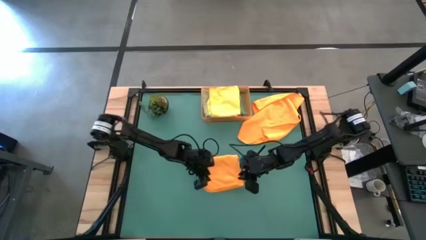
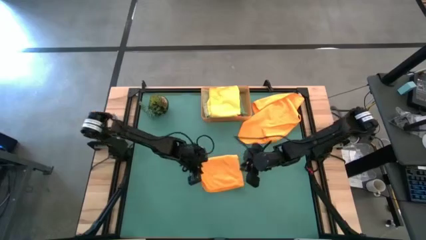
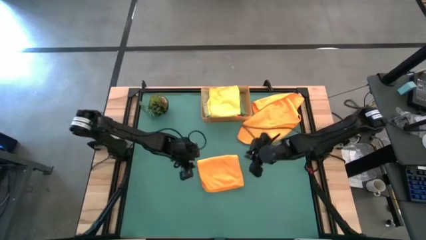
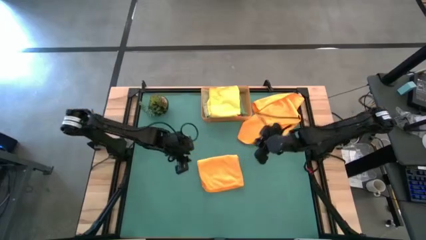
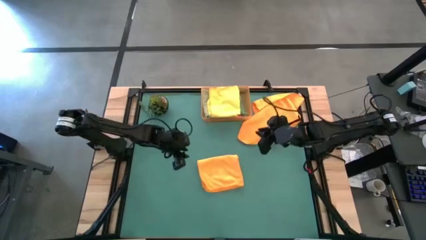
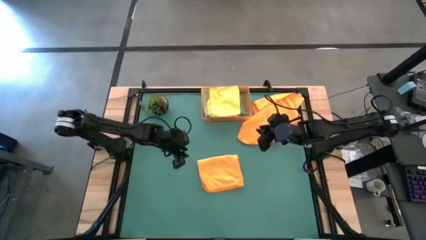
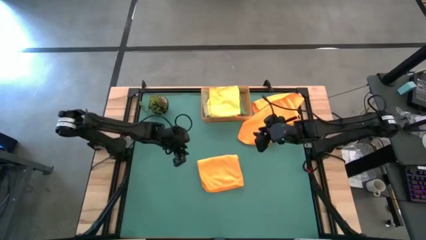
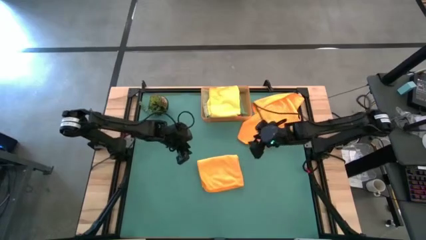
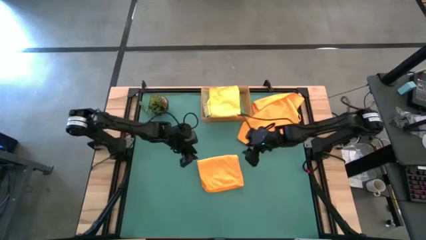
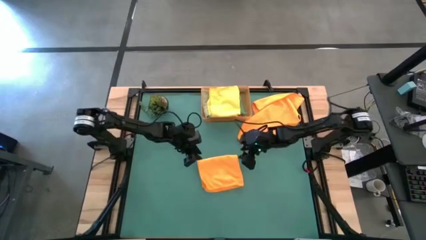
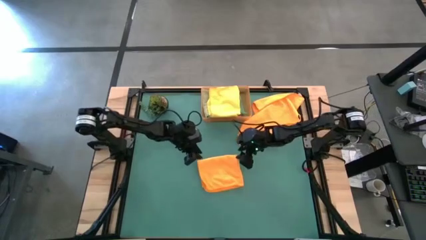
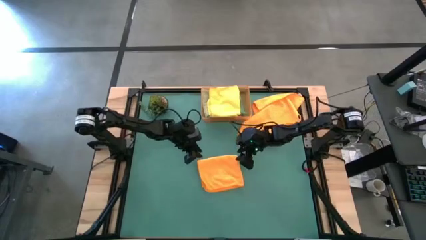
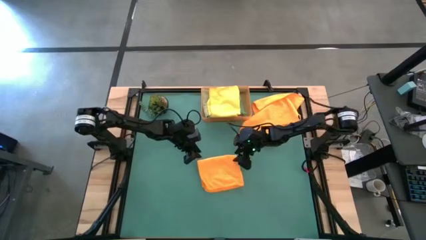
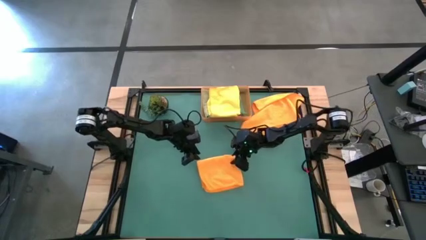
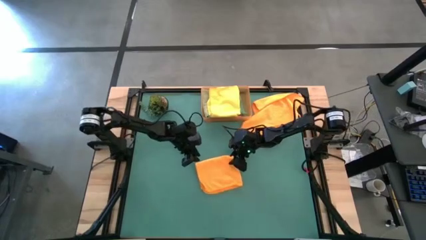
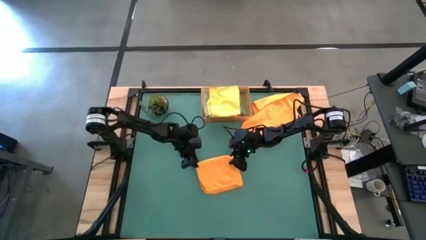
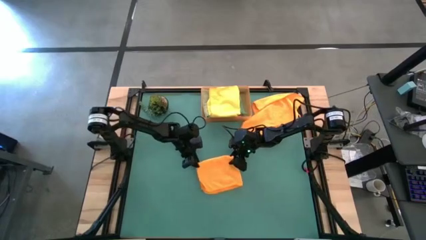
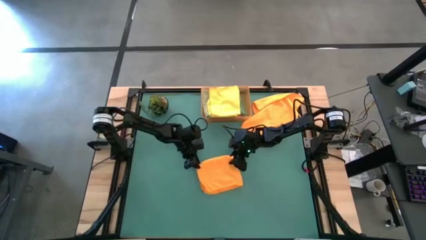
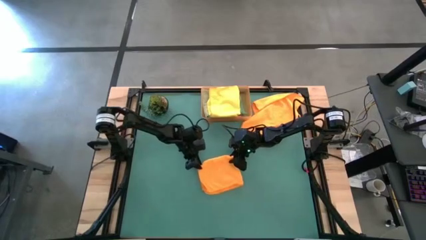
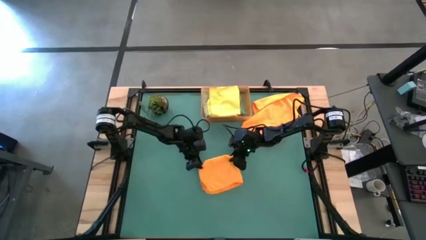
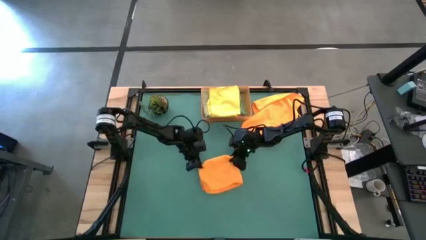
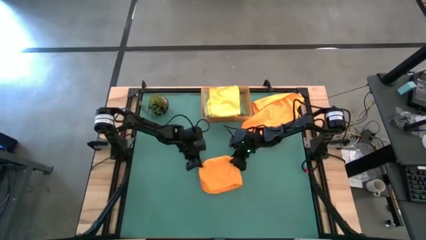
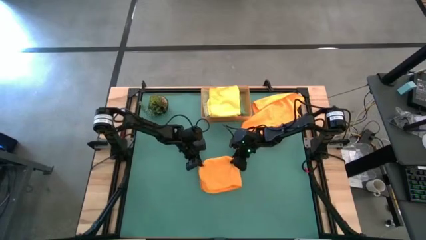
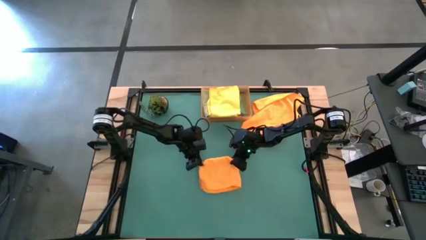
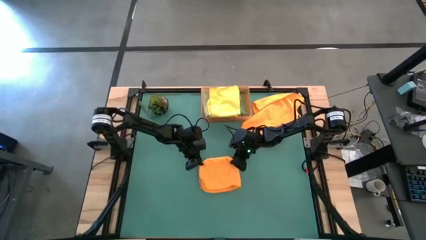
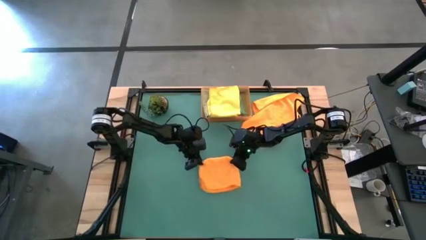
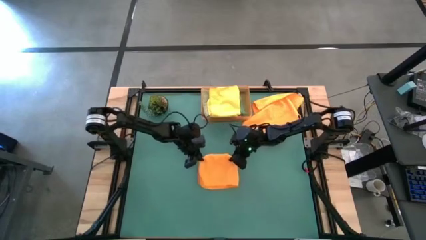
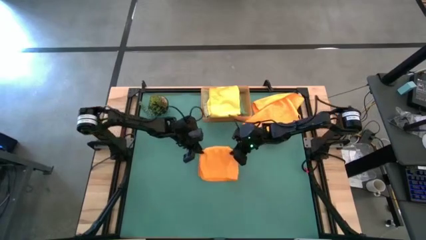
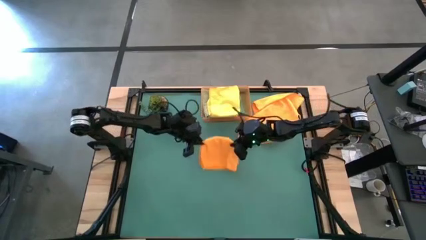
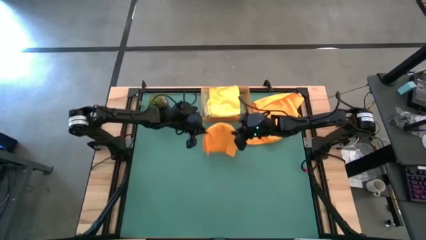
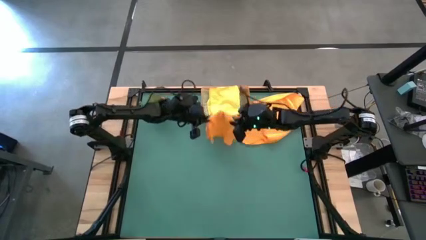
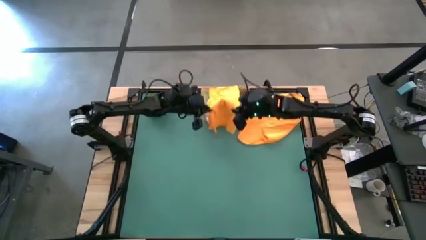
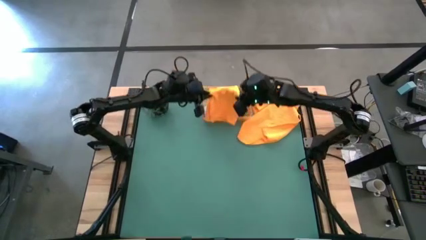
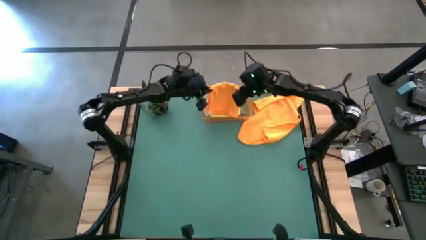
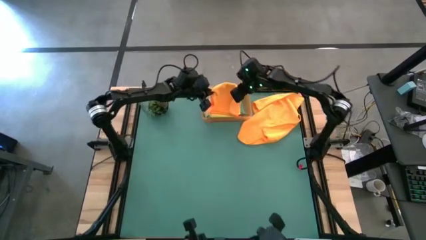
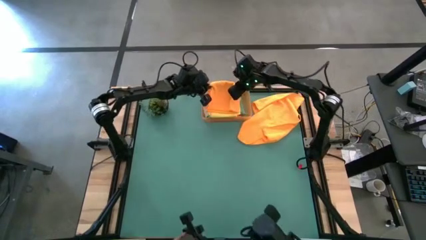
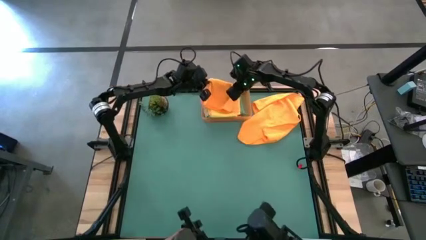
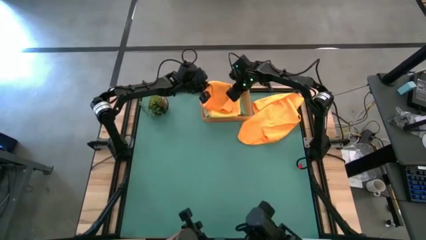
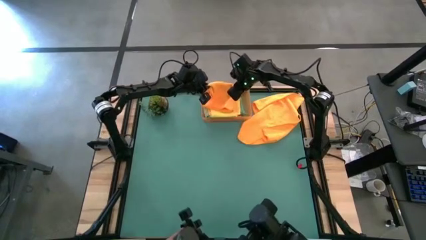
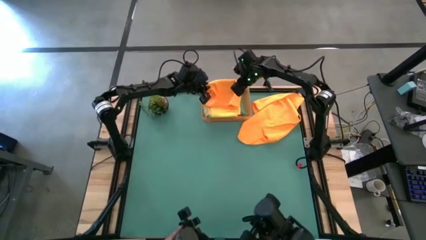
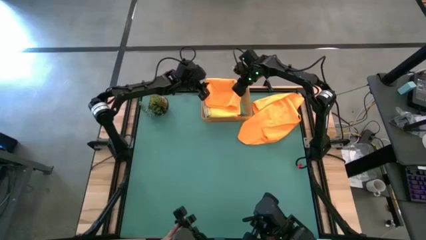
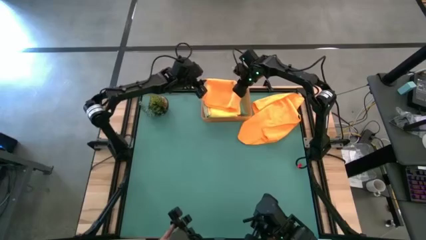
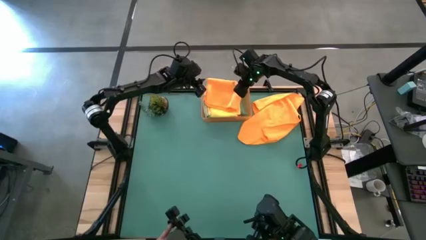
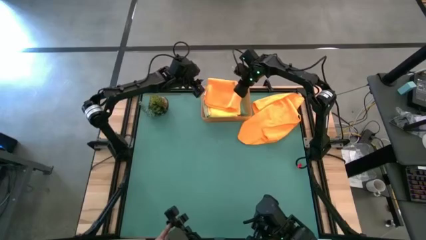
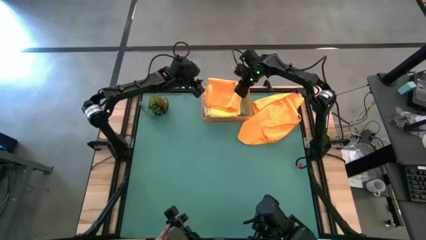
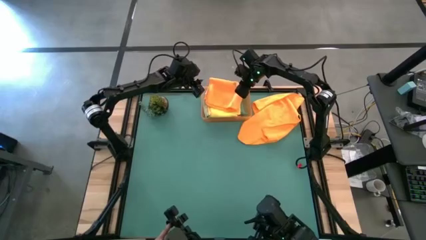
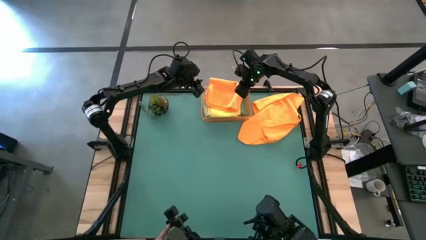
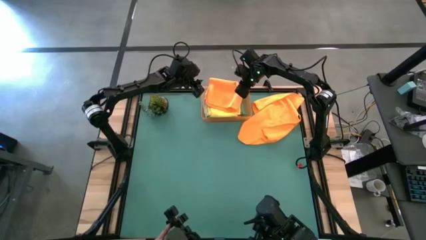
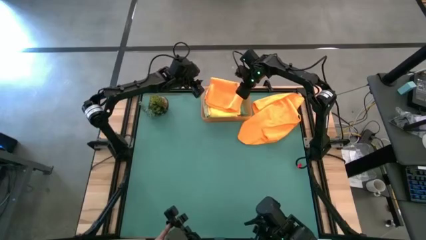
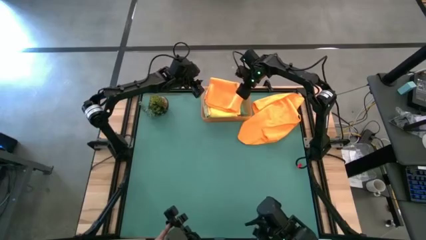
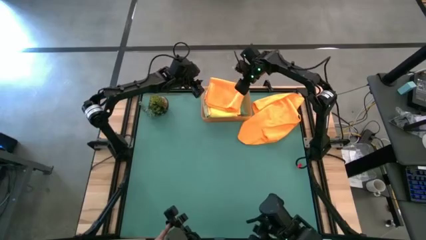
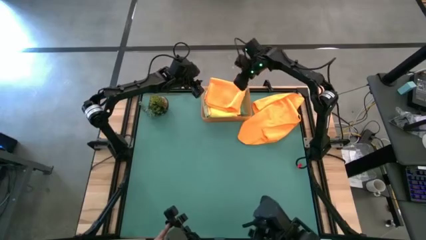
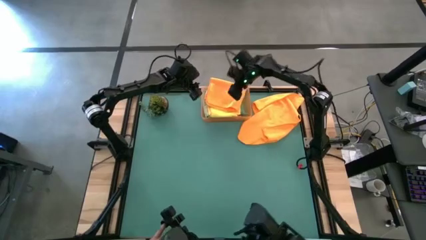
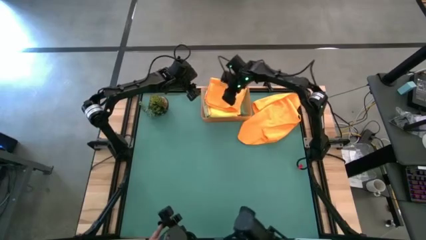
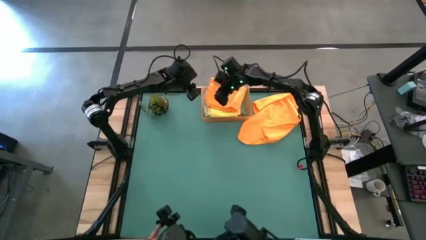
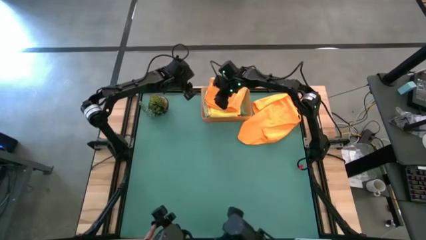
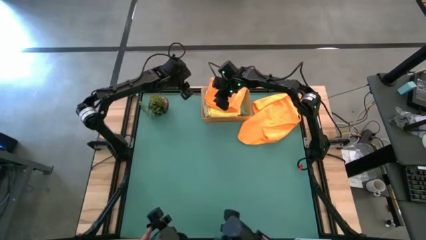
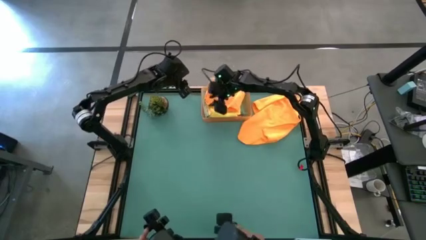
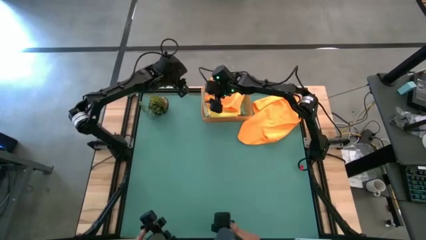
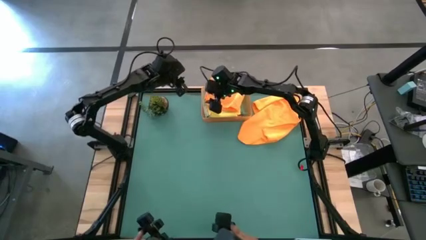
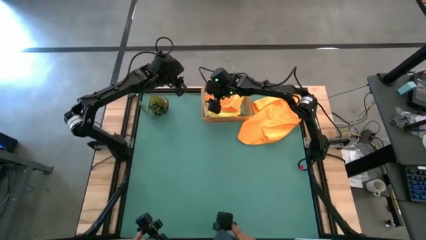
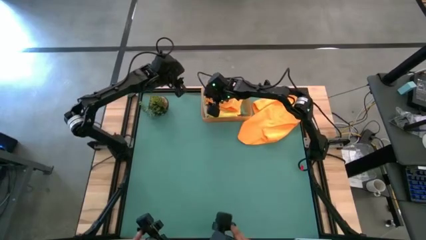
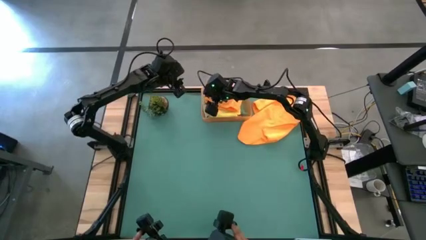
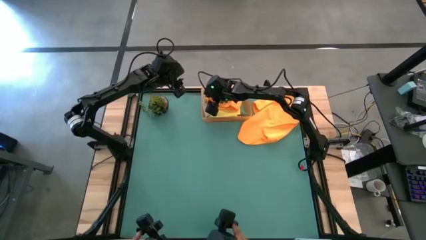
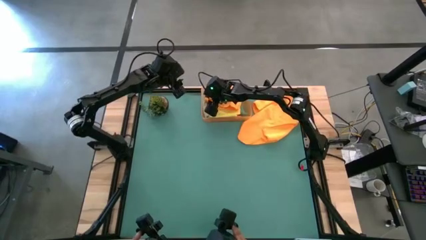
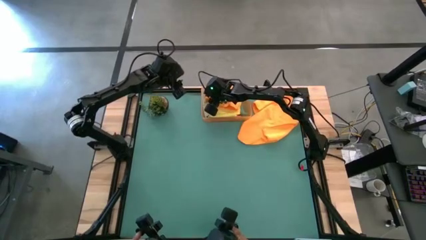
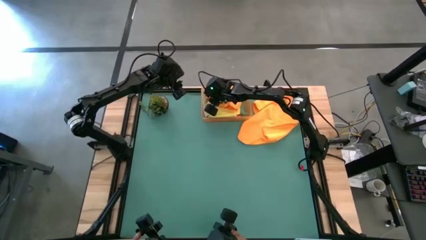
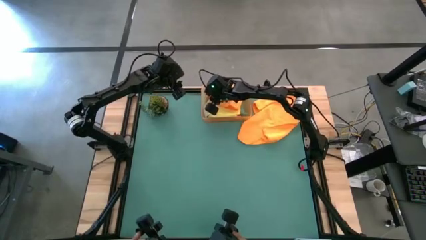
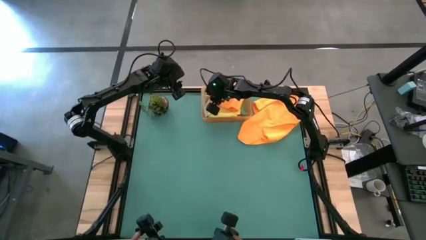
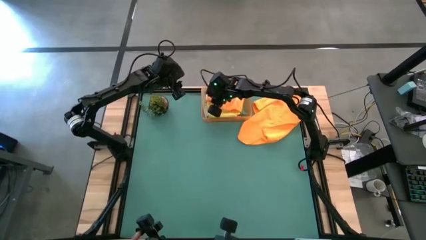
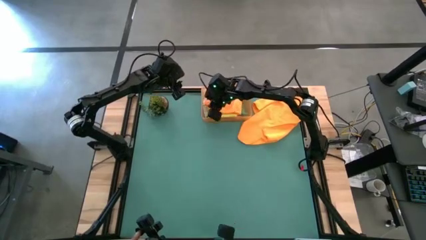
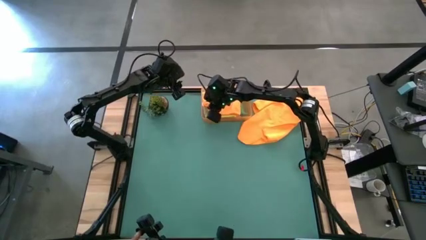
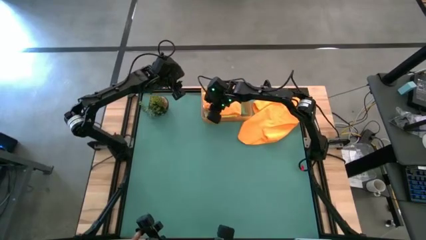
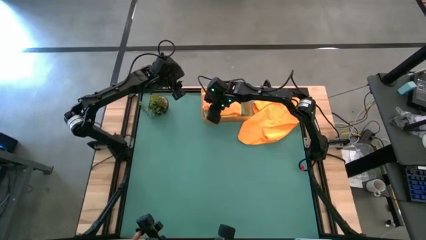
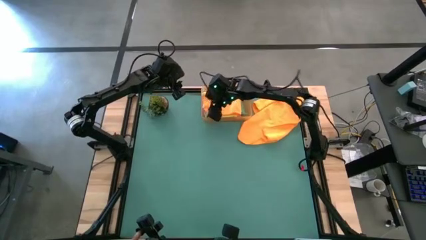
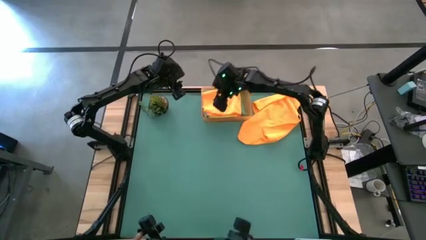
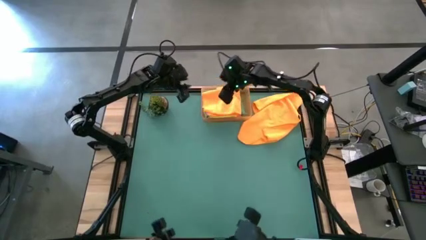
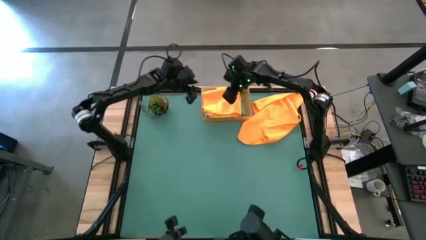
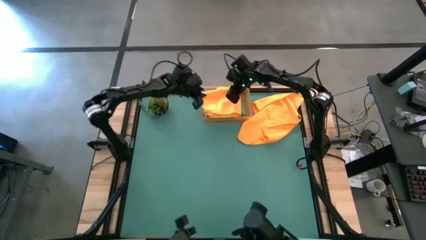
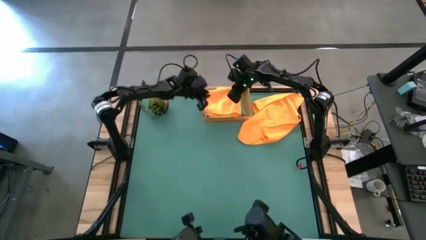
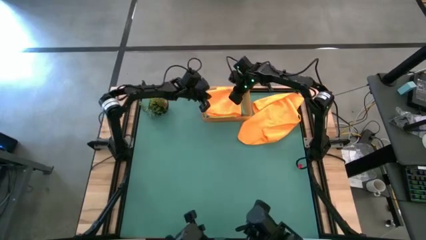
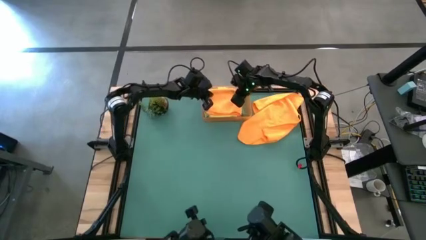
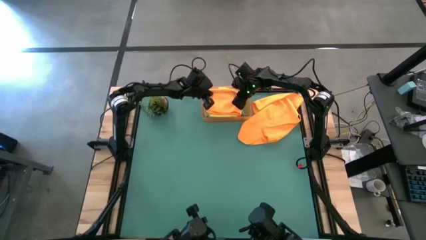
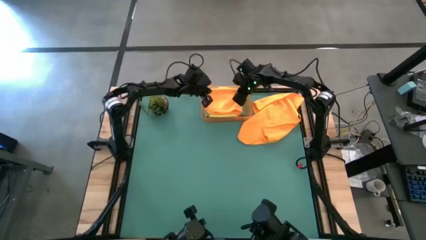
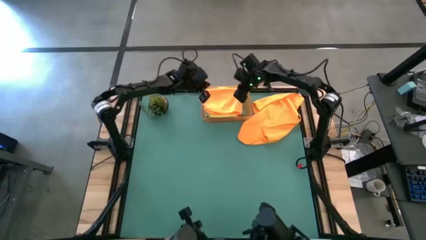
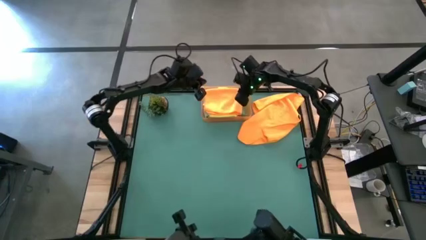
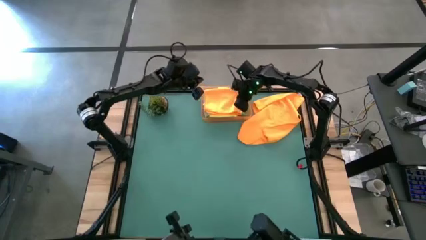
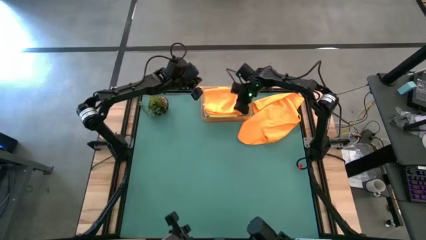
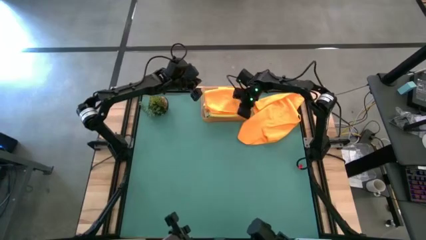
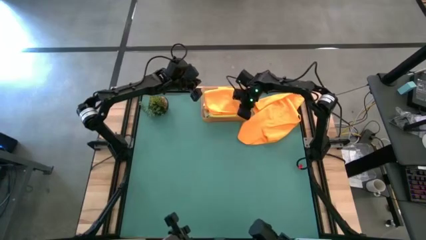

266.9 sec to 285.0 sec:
Task: Fold microfiber towels
Stack the bottom orange microfiber towel on top of the yellow microfiber towel in the orange bin
